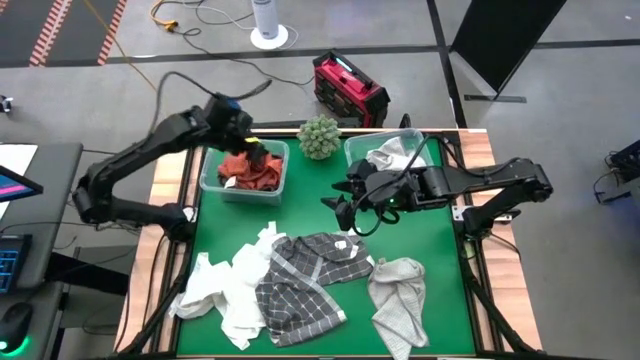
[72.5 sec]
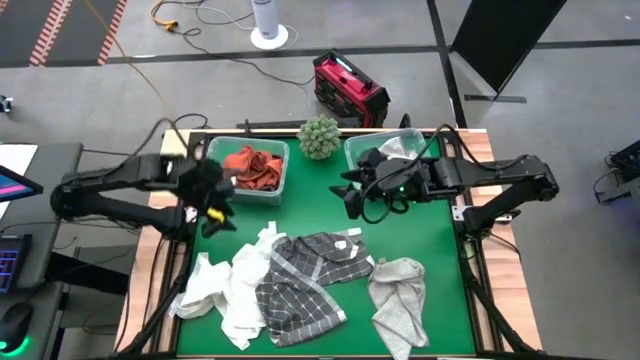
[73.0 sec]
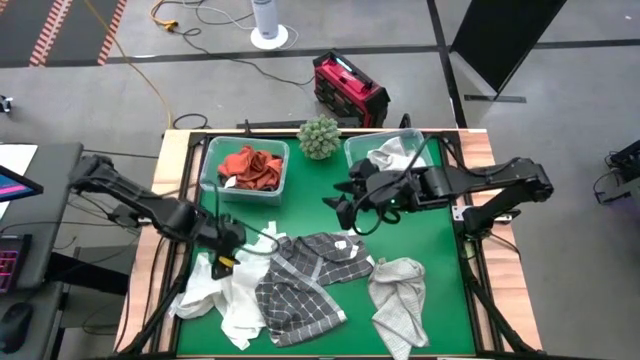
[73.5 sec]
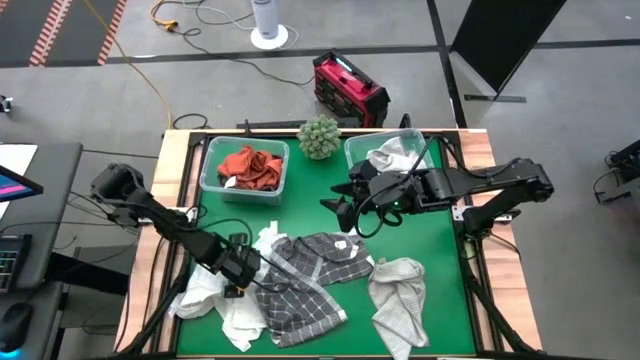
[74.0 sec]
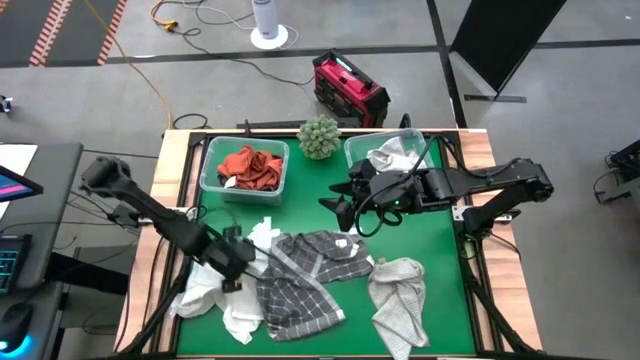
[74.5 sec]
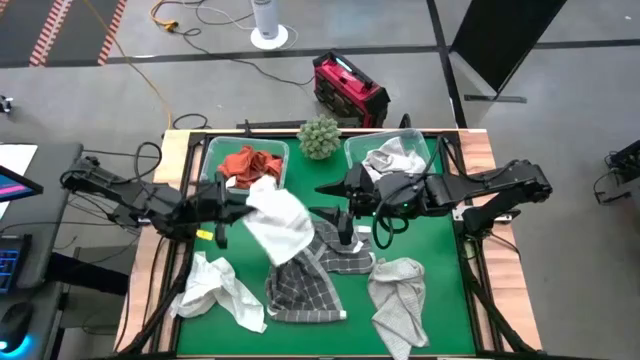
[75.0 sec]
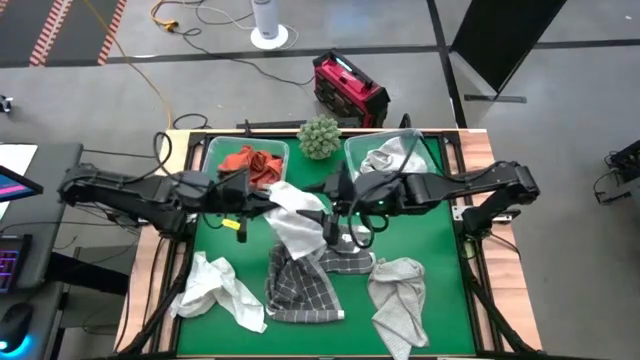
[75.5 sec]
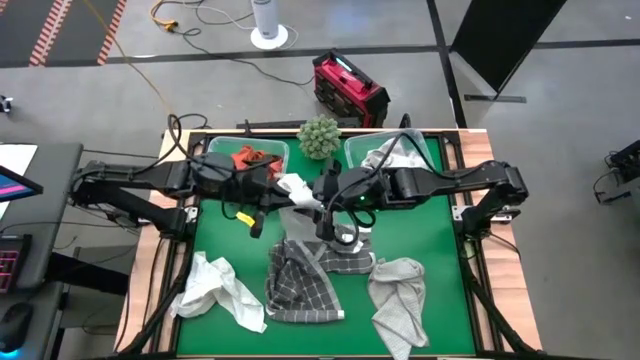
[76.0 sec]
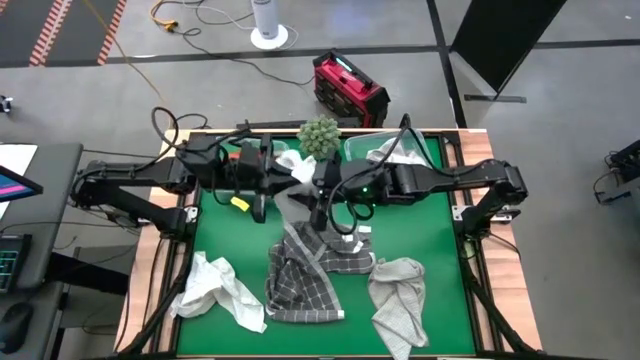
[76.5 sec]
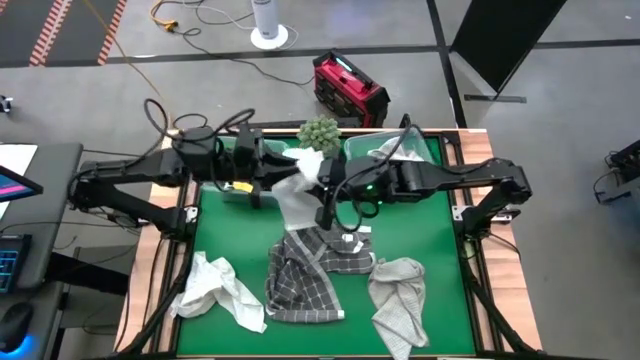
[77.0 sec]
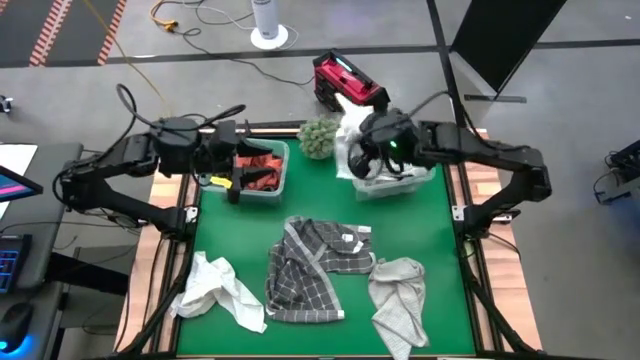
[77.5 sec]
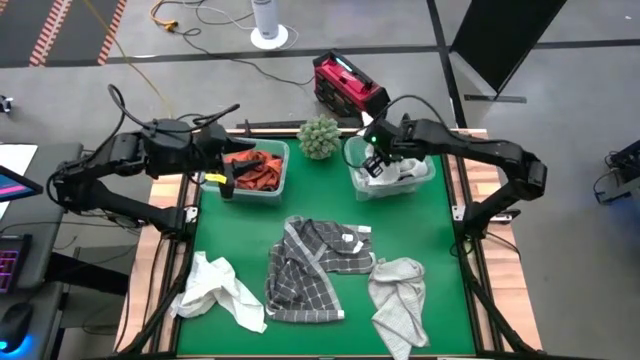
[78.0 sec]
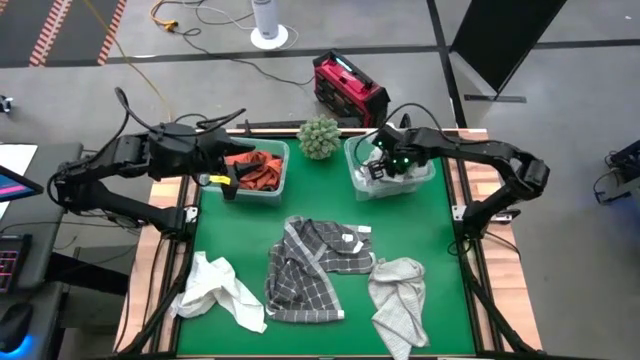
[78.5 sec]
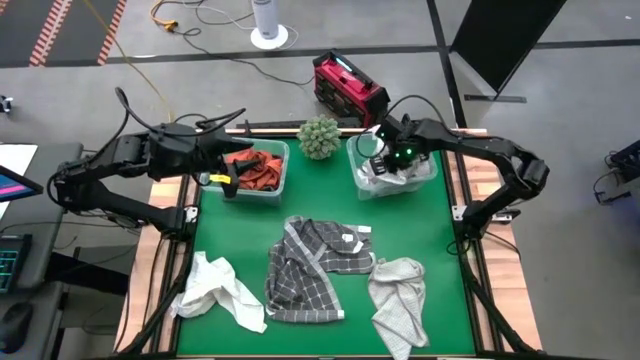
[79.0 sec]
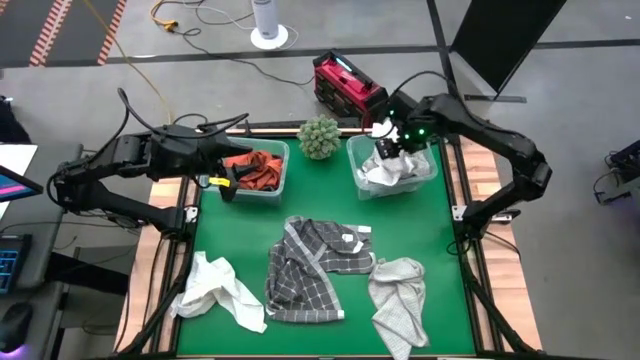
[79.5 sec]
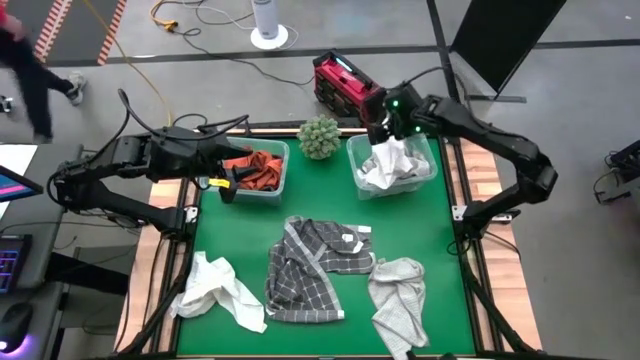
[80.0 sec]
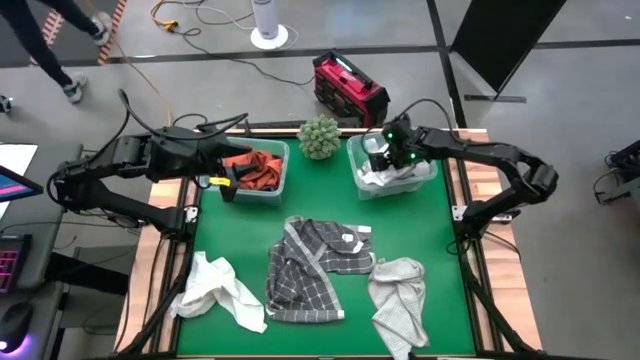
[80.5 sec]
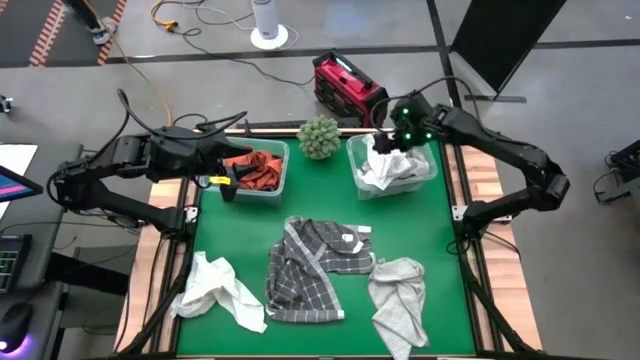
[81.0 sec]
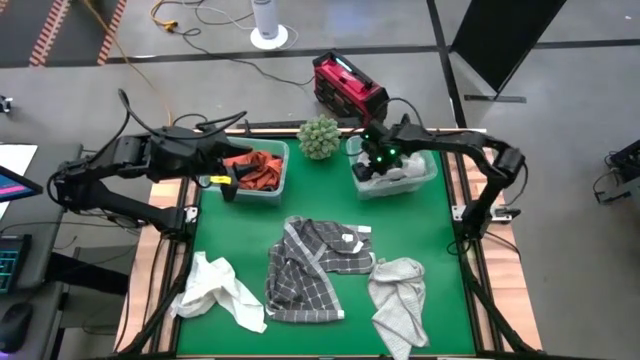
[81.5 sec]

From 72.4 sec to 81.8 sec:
Task: Sort towels by color in basket
Put the white towel into the right transparent bin

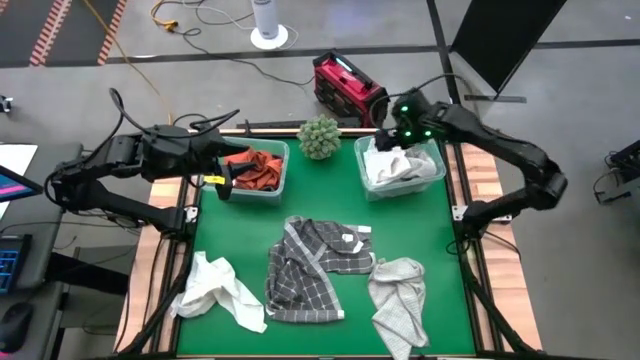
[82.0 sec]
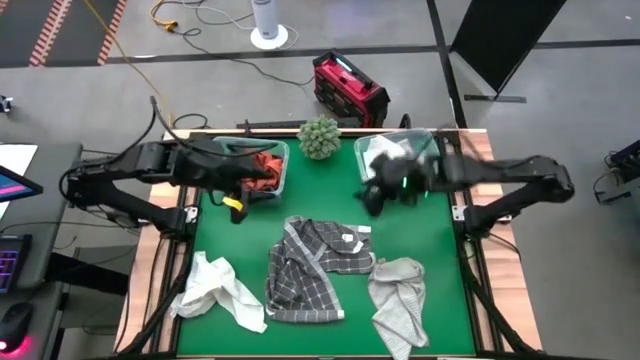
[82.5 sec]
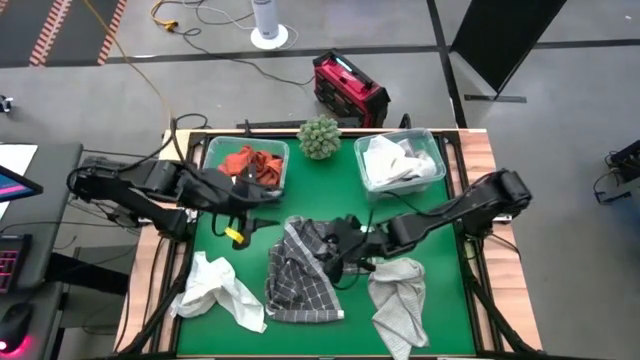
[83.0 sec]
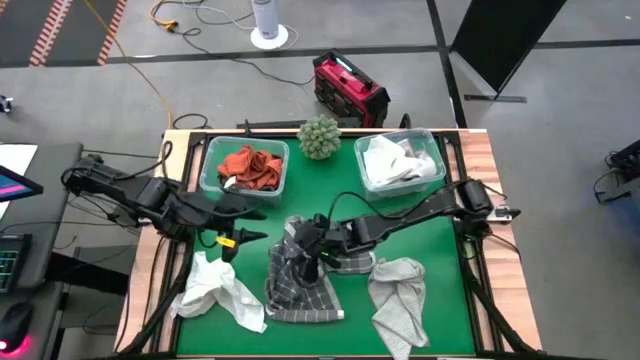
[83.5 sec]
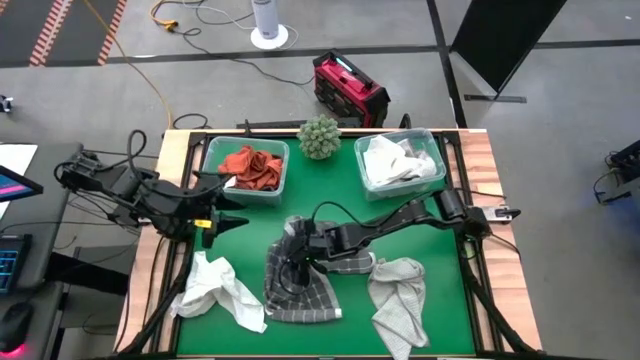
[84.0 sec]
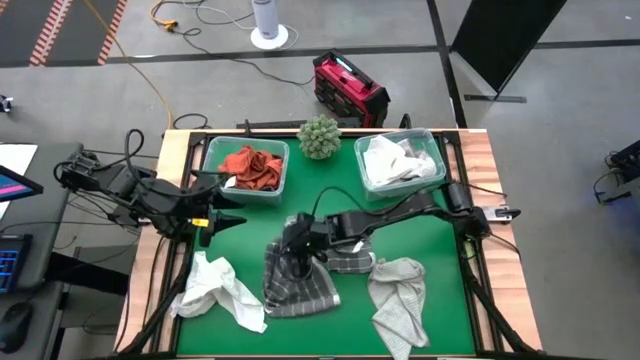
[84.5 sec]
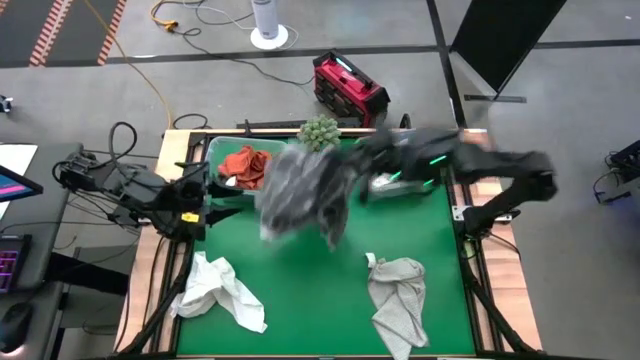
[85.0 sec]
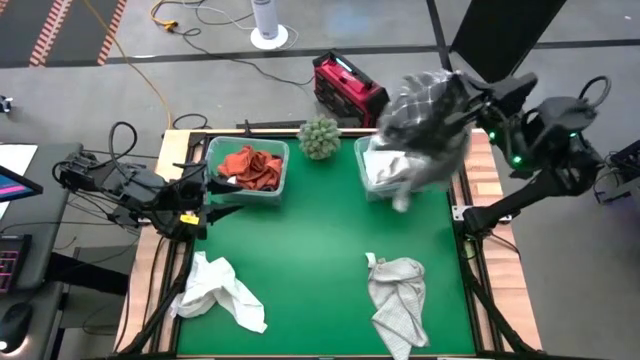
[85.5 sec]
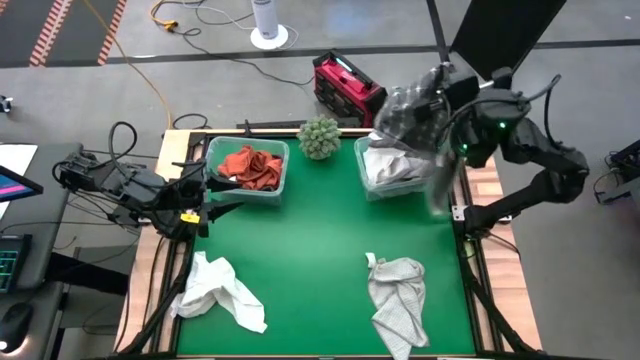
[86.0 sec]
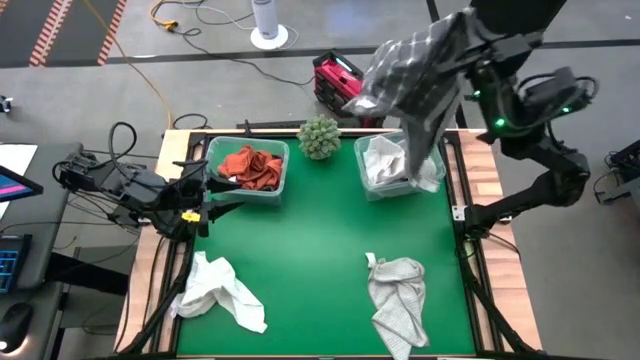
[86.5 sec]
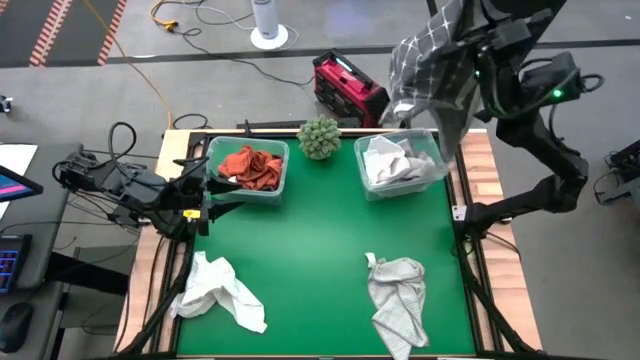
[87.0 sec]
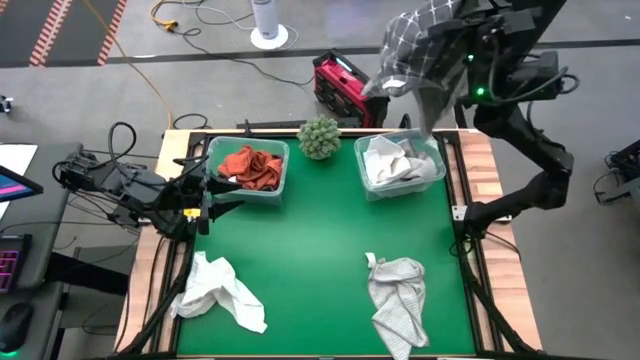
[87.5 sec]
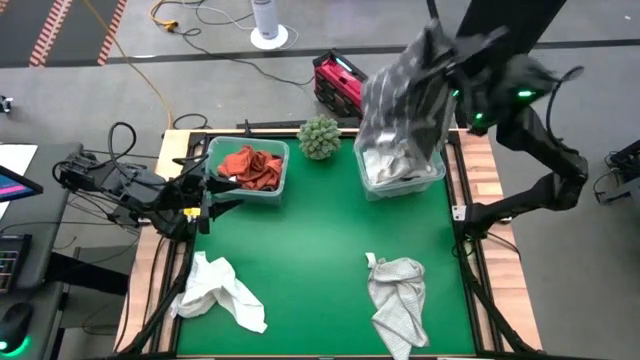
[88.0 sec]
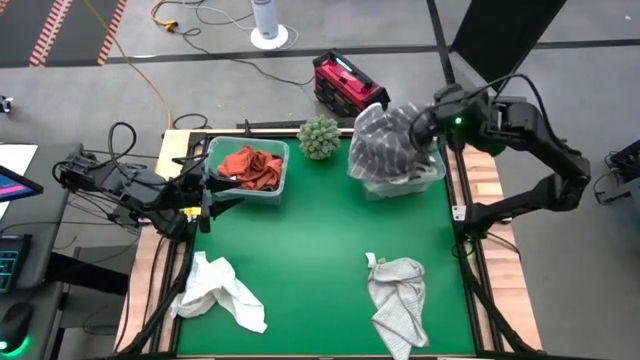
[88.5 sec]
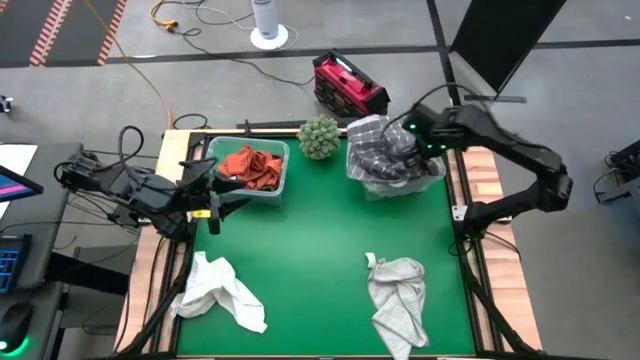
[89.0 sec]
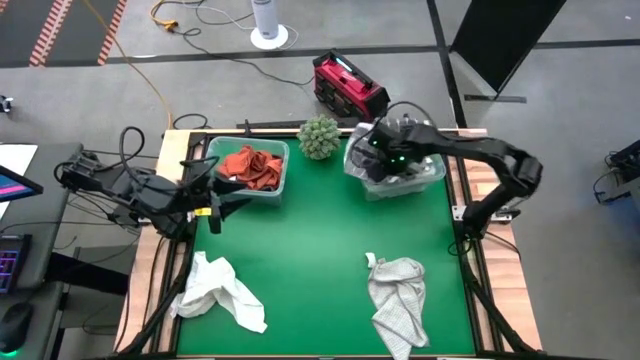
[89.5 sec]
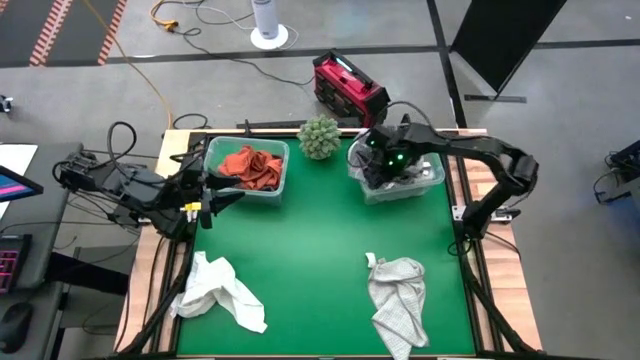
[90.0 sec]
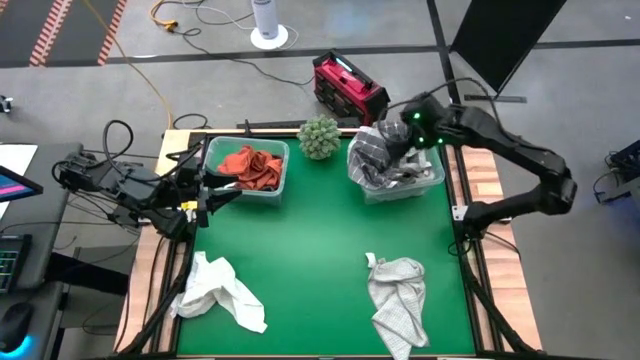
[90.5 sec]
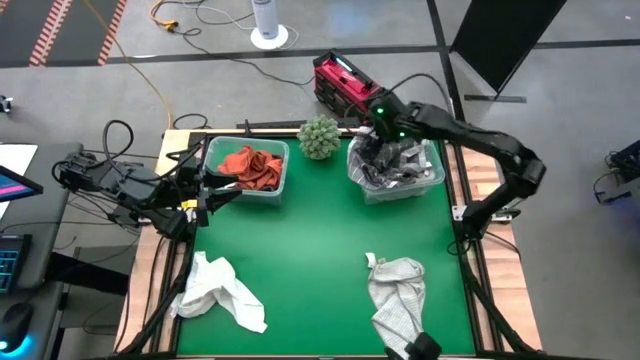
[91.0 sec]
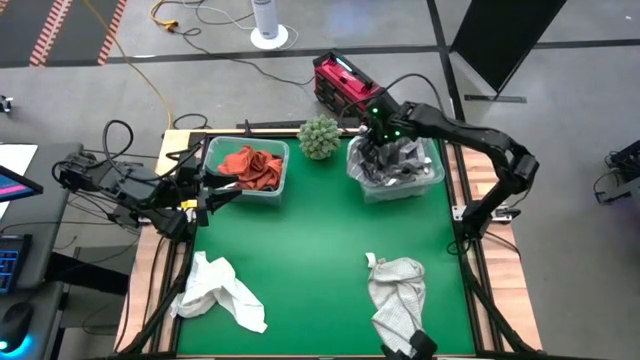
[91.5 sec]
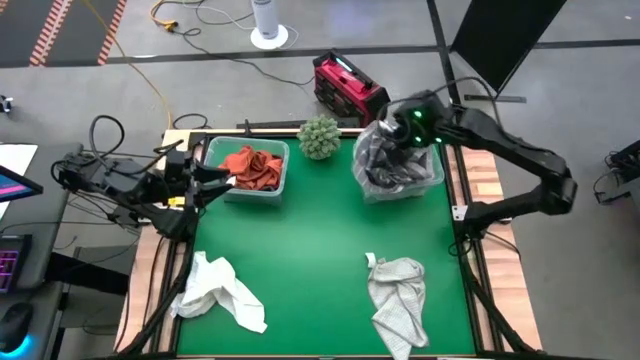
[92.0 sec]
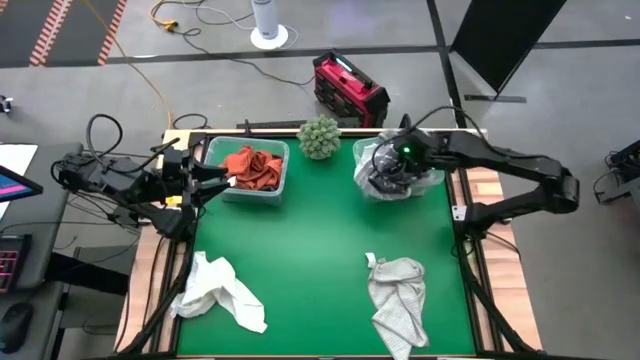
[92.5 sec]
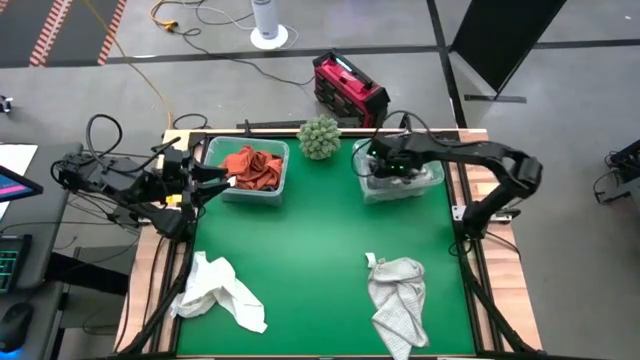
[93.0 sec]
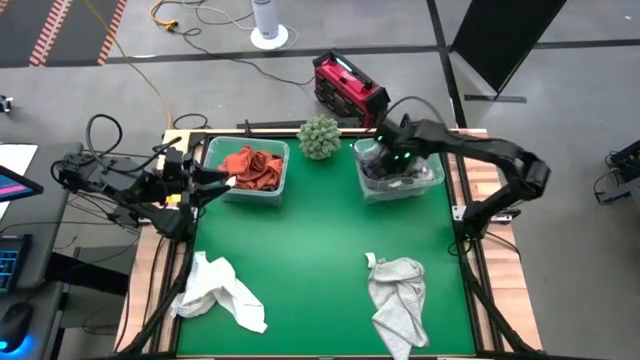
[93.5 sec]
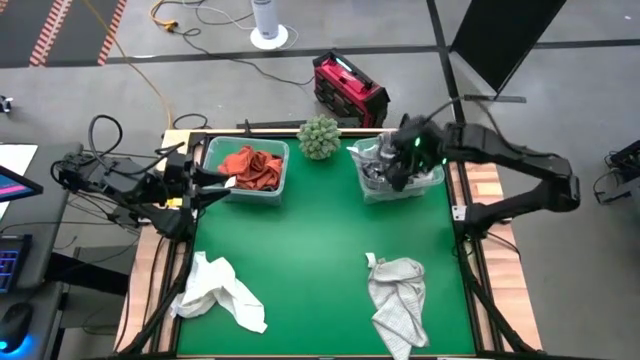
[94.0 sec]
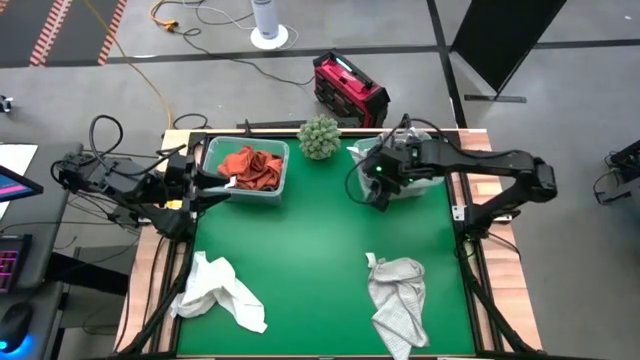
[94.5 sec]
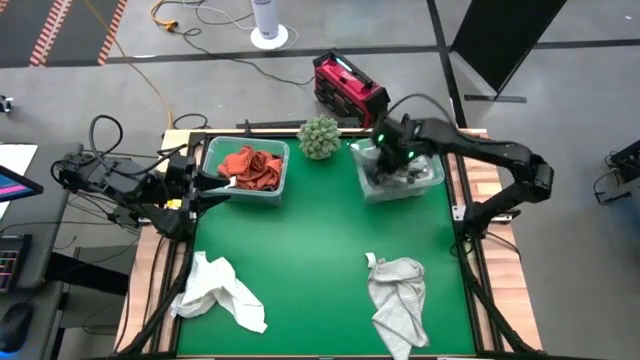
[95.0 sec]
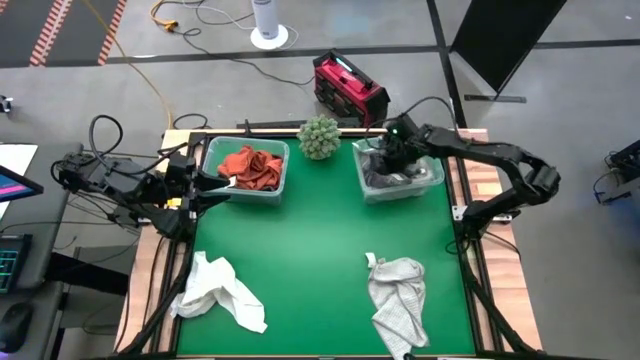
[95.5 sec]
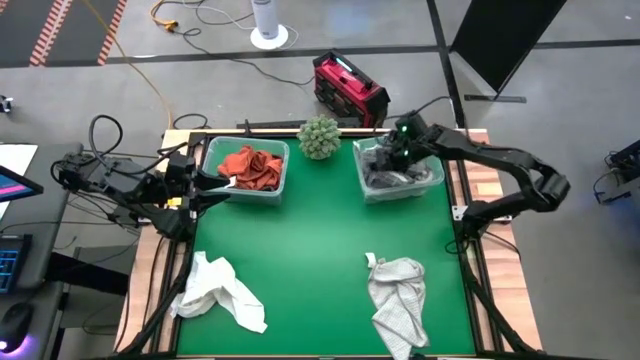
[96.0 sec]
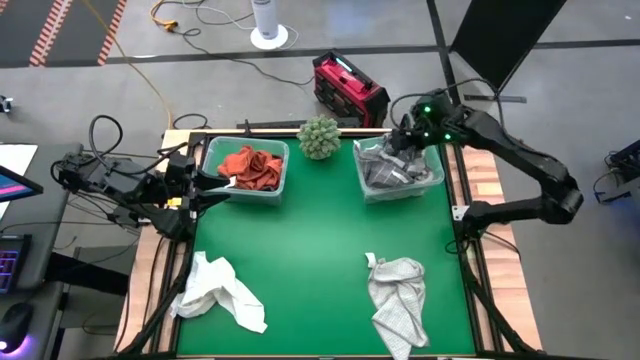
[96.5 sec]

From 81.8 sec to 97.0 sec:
Put the black pattern towel into the right transparent bin
